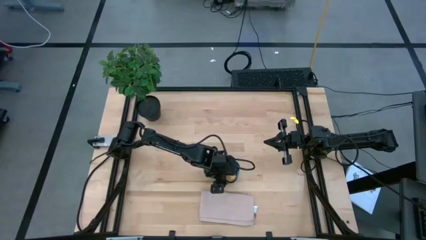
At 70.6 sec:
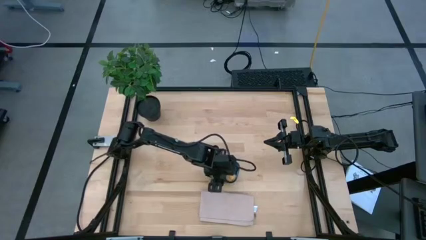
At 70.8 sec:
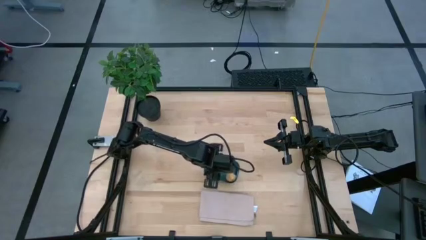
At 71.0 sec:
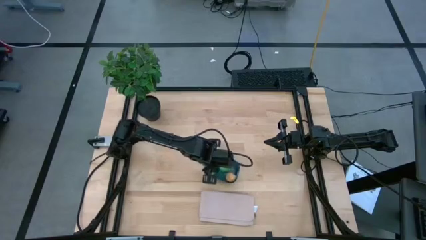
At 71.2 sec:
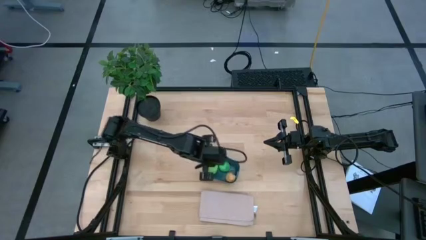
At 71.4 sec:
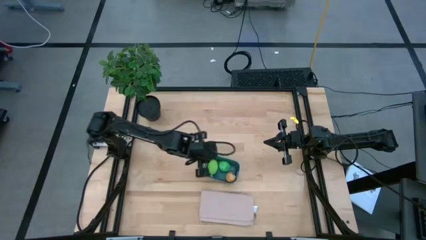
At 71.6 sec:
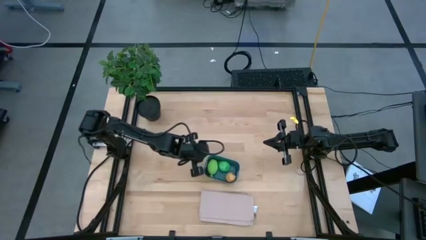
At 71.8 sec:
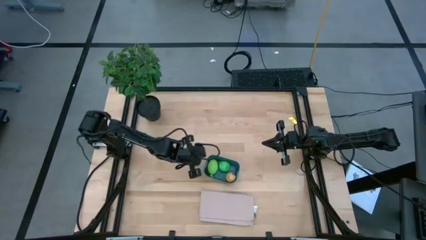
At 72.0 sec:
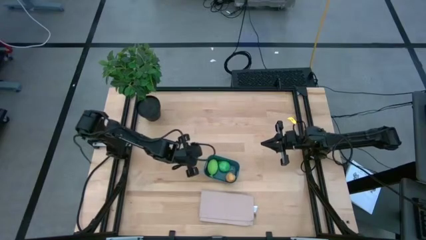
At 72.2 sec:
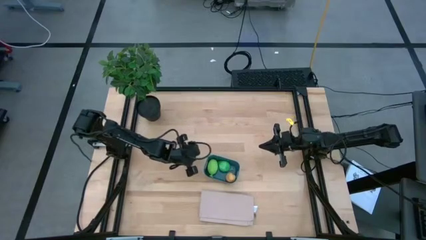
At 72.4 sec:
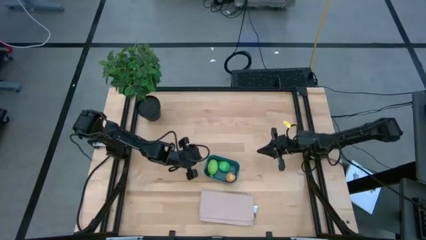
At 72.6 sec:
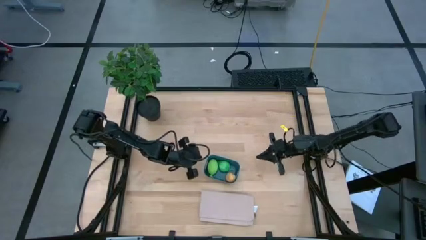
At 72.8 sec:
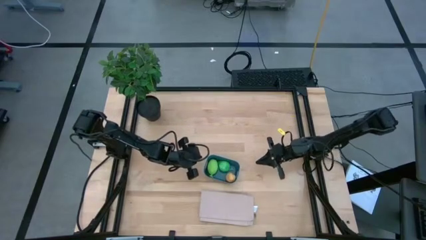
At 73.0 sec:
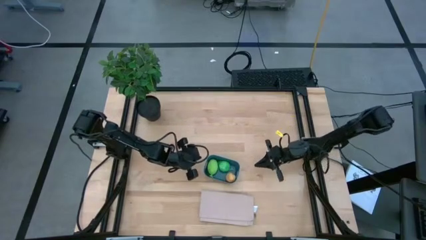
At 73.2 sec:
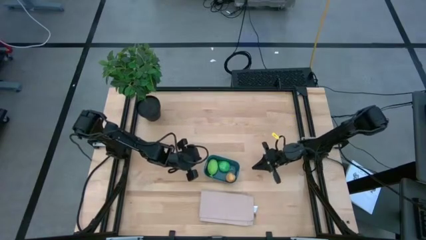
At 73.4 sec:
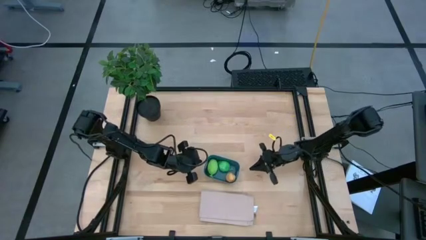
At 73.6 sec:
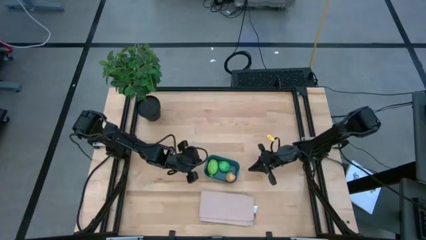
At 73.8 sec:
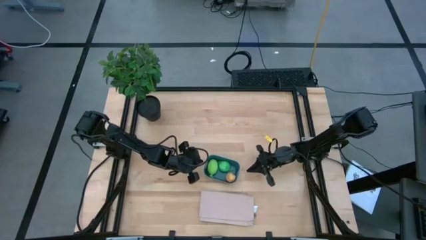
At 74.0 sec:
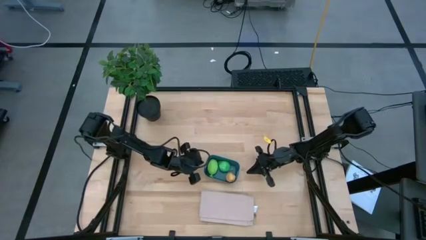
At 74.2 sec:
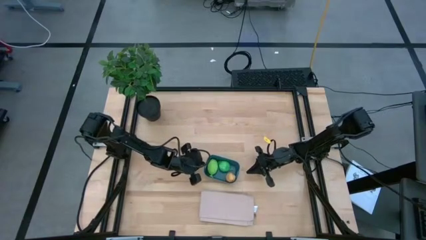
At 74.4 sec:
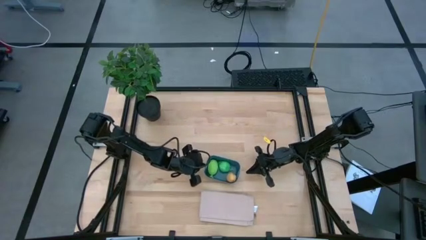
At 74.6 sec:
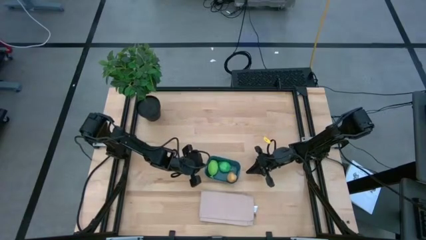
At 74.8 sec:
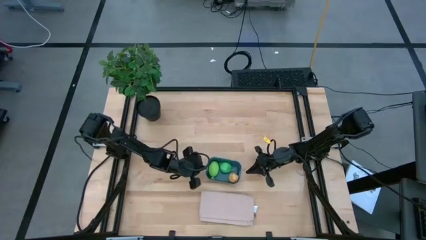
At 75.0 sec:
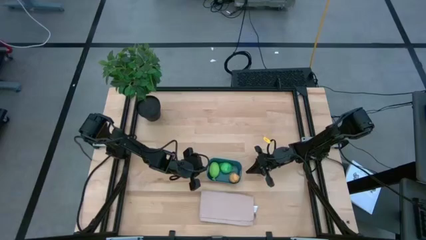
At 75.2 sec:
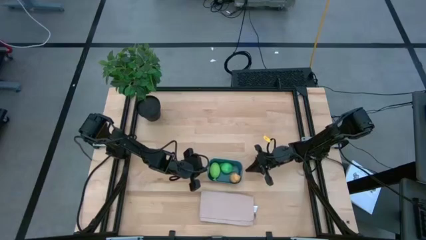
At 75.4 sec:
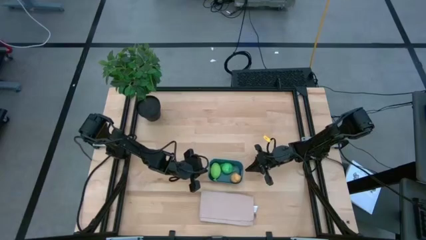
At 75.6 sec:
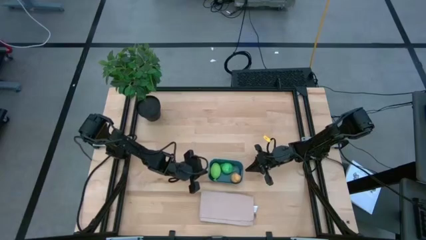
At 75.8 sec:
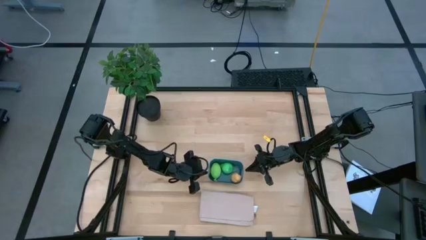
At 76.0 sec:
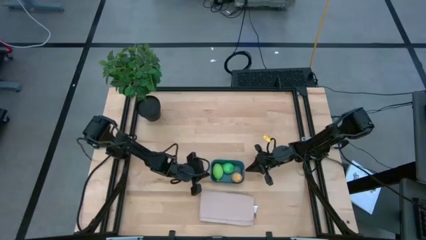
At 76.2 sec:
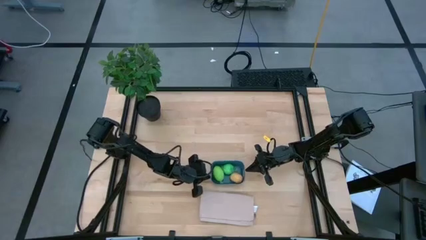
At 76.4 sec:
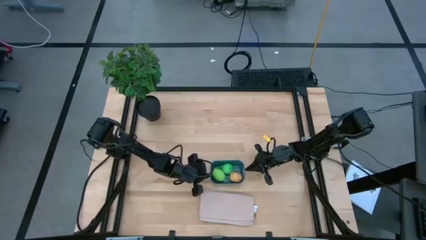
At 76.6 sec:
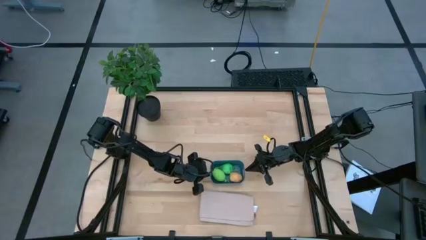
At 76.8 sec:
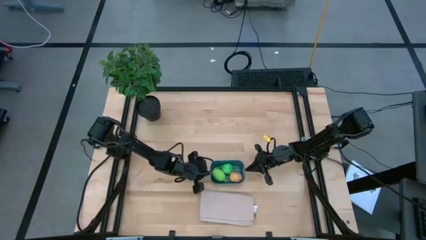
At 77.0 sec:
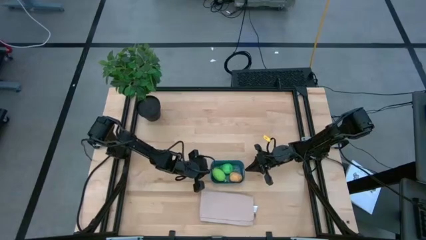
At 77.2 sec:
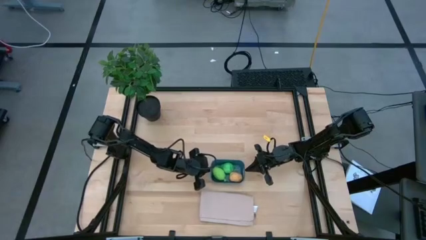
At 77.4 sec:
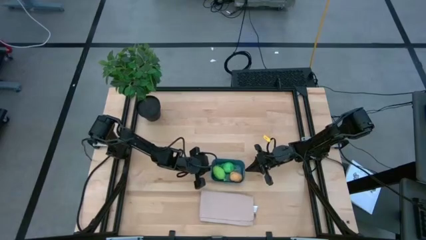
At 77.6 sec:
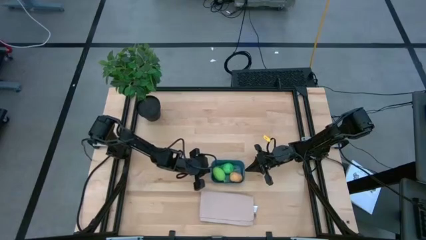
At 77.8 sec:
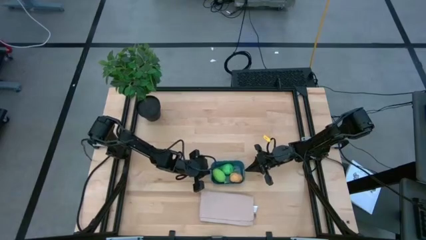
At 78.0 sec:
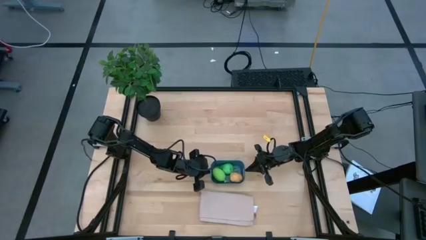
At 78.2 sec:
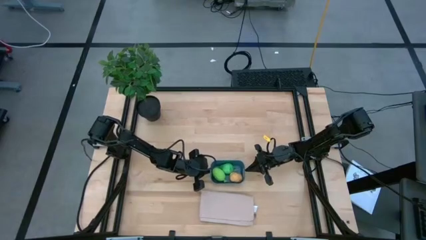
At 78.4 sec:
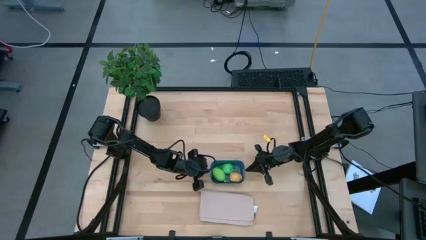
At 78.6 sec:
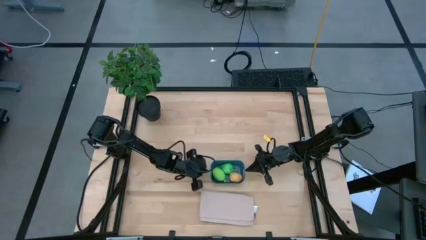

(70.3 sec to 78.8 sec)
Task: Pick and placing Produce into tupperware
Adjust the blue bin

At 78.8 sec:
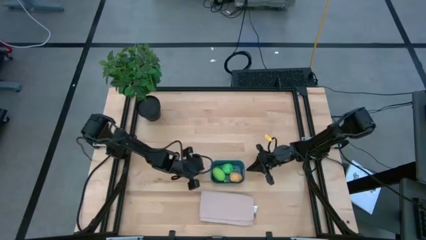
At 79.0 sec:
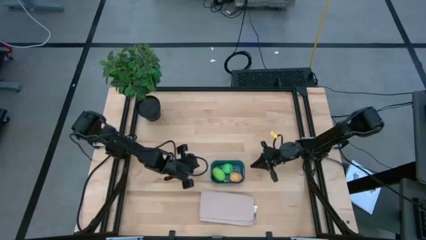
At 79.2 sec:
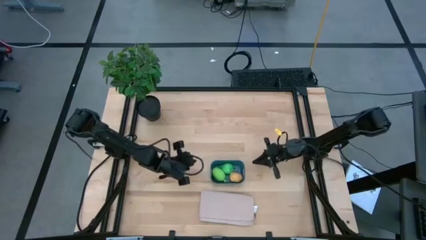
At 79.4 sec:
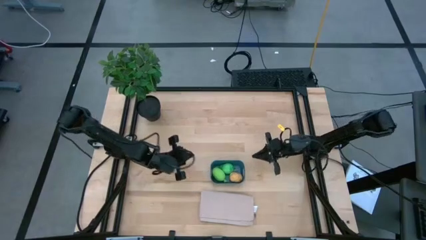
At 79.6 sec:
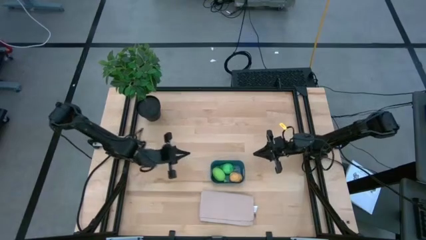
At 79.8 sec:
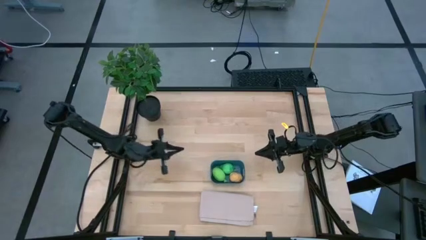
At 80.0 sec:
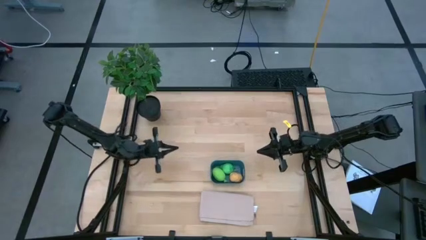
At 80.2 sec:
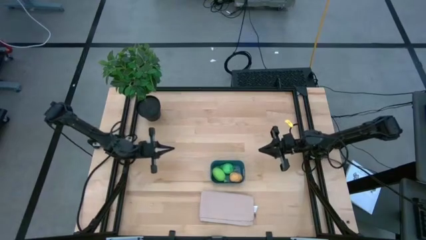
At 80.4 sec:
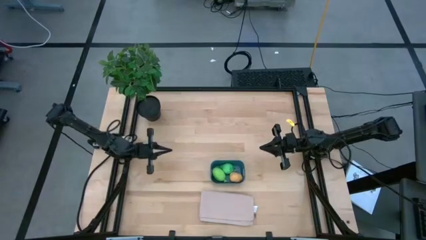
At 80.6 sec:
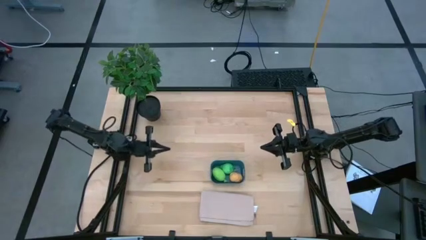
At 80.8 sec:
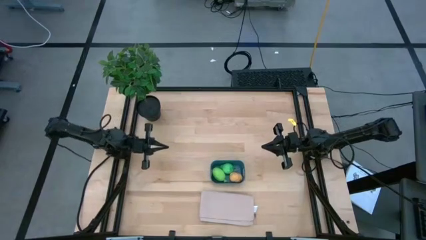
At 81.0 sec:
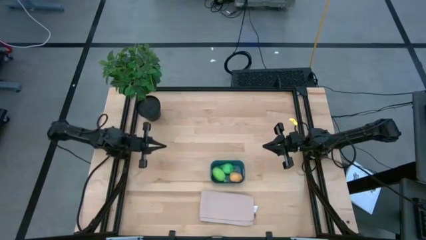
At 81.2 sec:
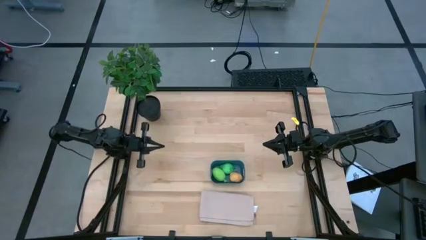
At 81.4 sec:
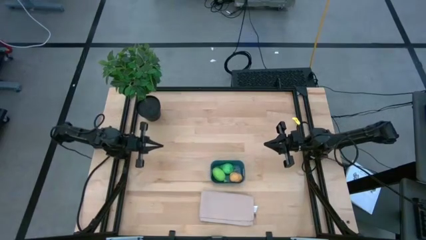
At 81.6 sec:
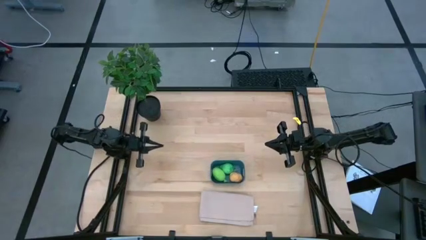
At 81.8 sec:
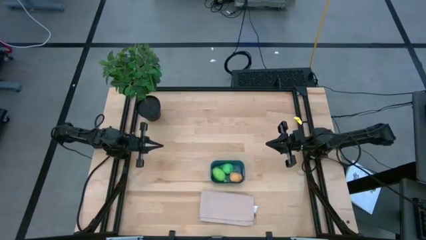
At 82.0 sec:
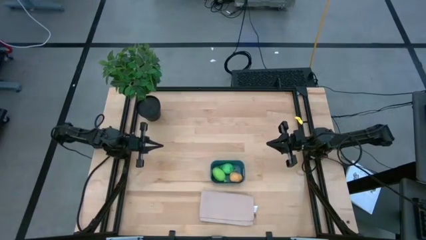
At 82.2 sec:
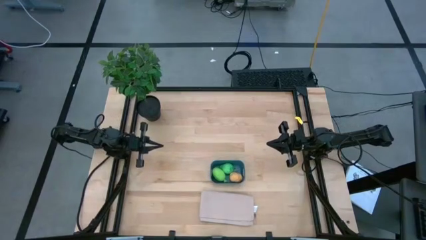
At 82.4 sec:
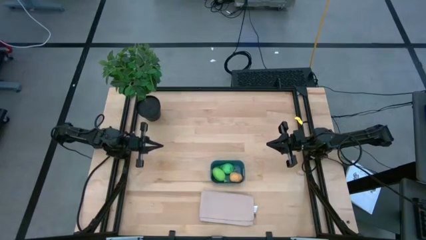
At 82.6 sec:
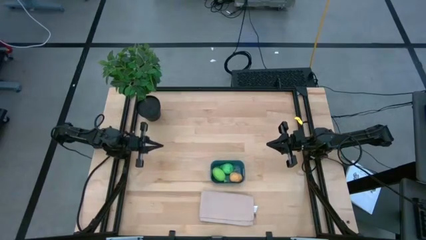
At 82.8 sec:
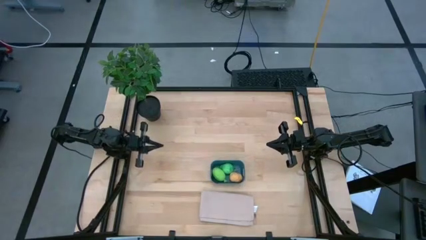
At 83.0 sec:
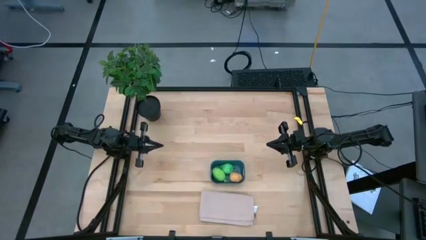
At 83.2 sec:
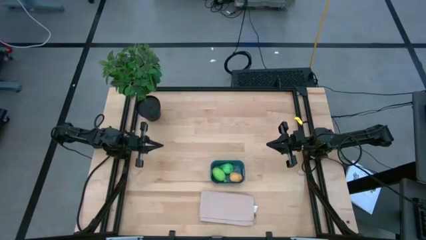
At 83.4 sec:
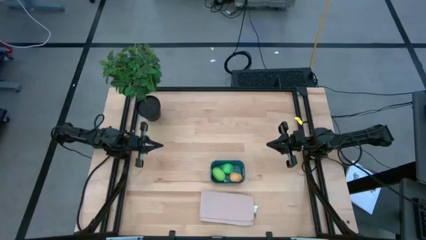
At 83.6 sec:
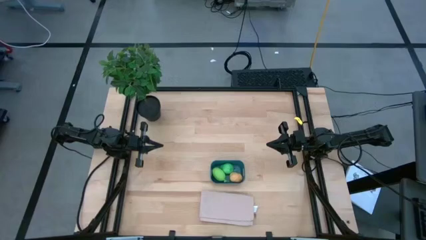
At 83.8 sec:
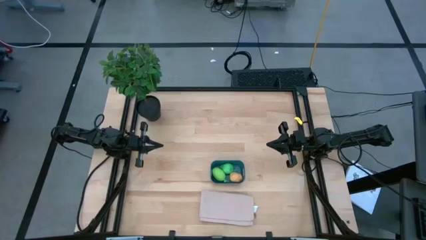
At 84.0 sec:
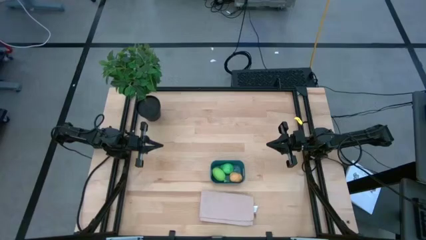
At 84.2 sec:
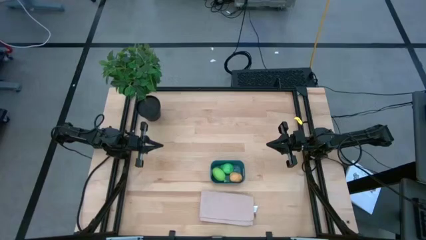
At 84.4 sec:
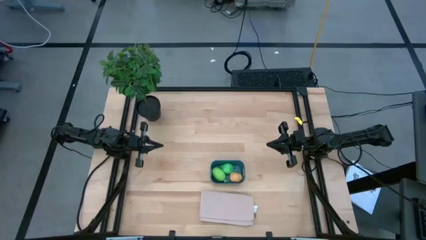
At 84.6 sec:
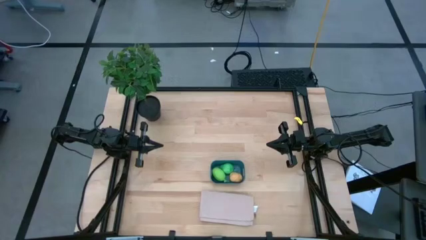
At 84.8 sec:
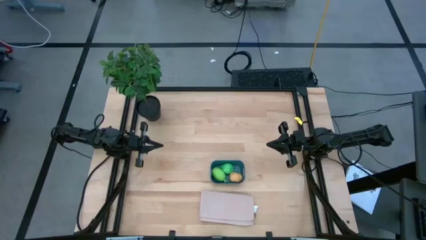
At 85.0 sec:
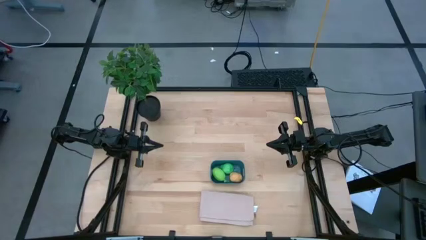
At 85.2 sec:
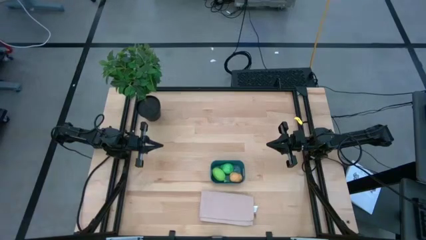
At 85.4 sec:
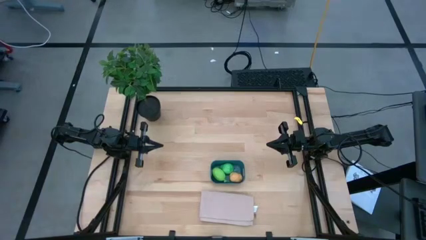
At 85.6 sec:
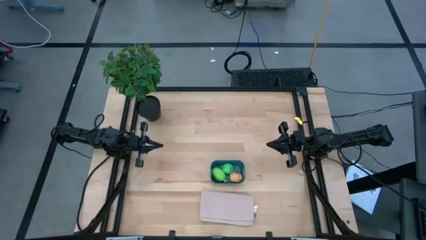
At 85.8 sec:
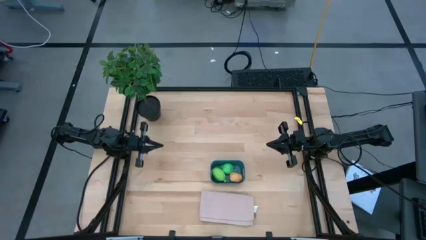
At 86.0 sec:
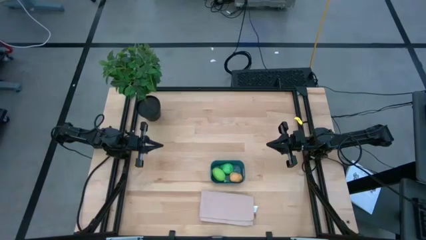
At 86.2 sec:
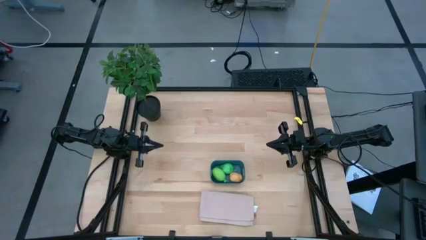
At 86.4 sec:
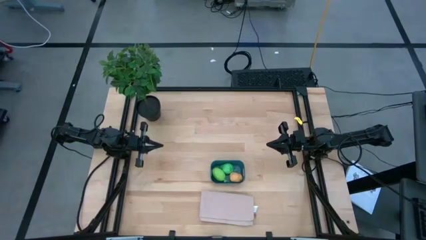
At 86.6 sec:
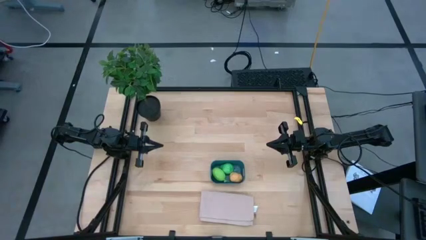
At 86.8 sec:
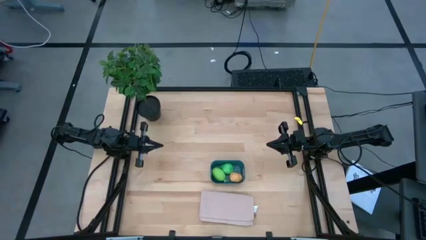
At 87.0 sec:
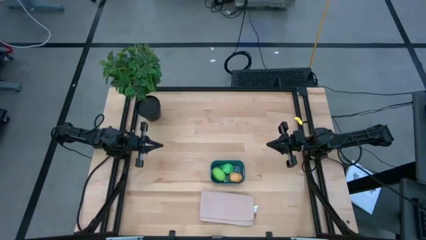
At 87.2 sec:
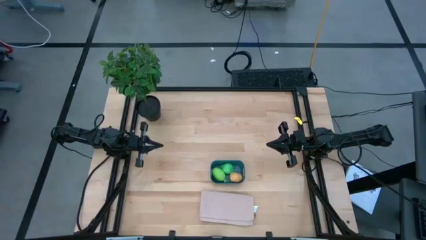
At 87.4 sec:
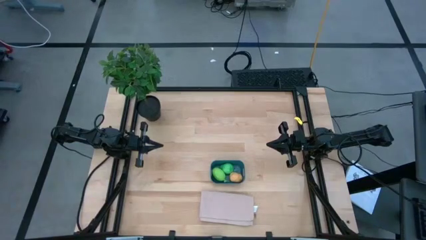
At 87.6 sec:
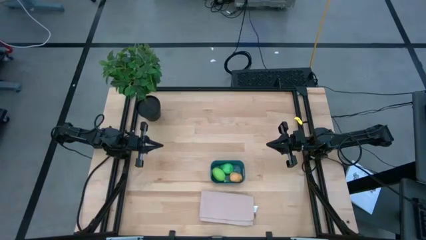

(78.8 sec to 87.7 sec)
Return to Home Position
